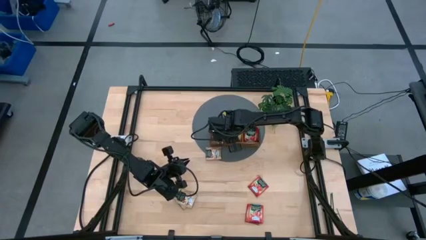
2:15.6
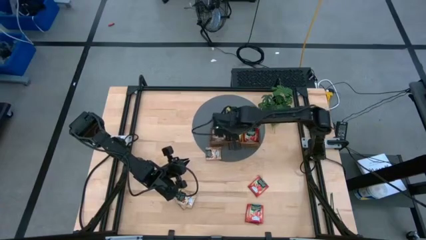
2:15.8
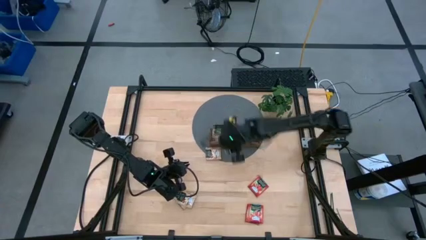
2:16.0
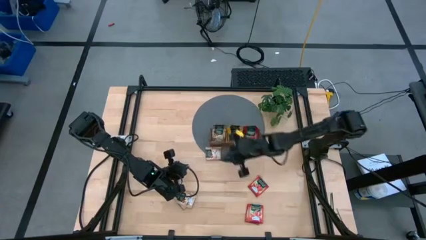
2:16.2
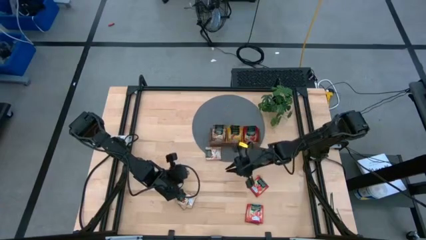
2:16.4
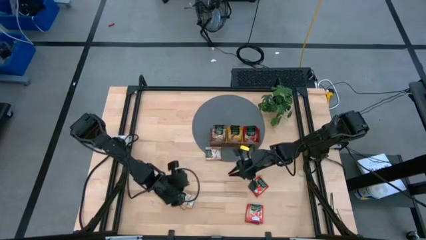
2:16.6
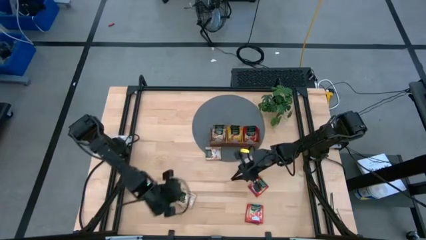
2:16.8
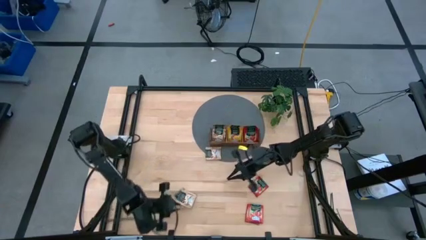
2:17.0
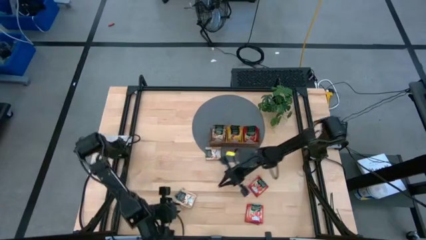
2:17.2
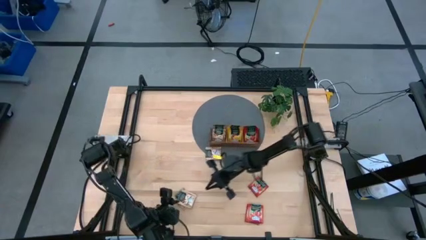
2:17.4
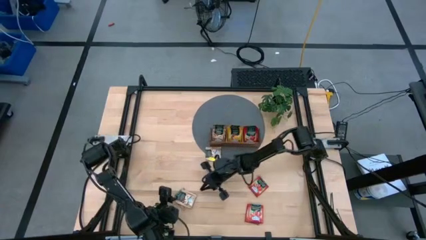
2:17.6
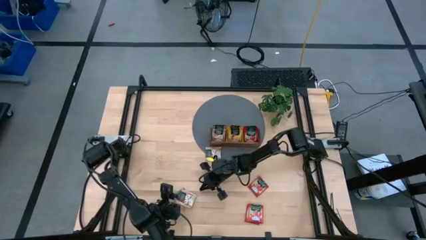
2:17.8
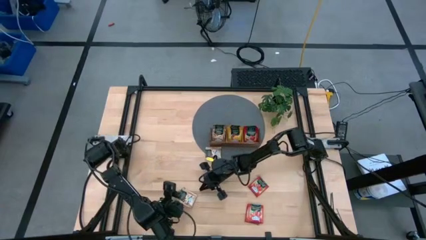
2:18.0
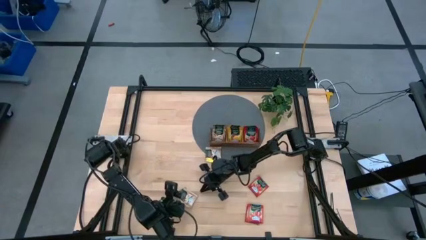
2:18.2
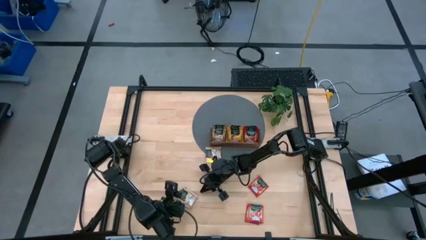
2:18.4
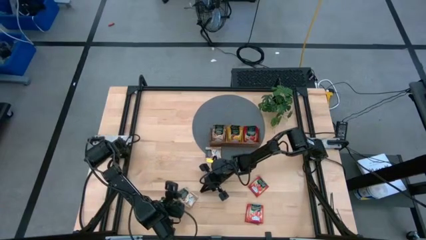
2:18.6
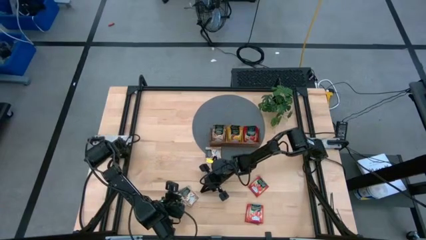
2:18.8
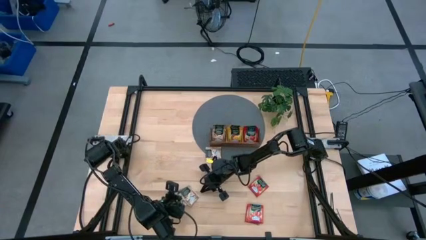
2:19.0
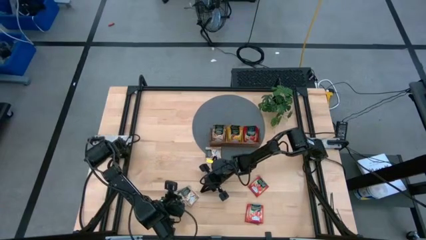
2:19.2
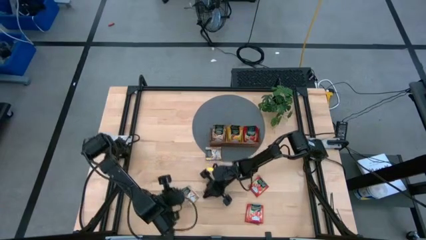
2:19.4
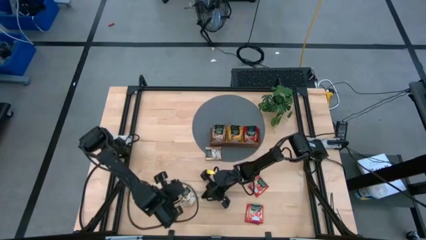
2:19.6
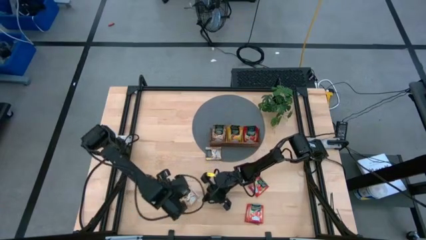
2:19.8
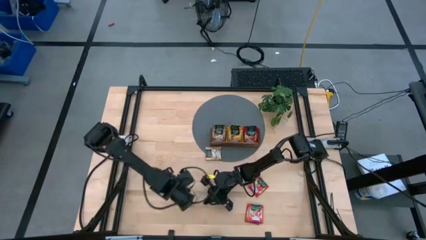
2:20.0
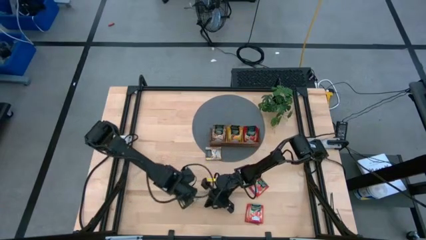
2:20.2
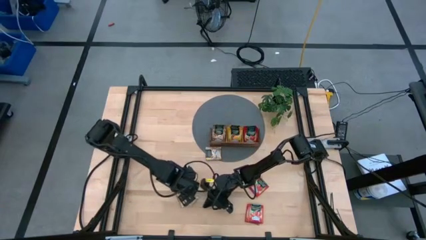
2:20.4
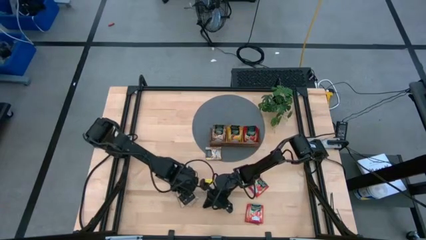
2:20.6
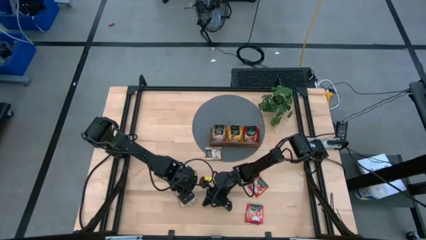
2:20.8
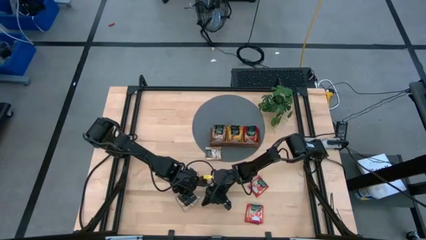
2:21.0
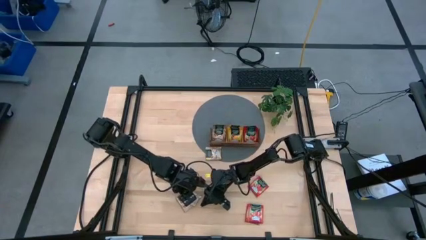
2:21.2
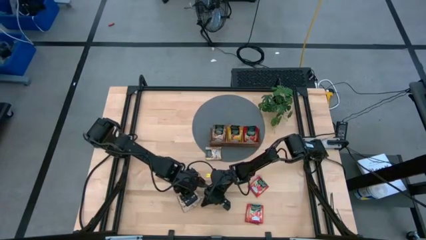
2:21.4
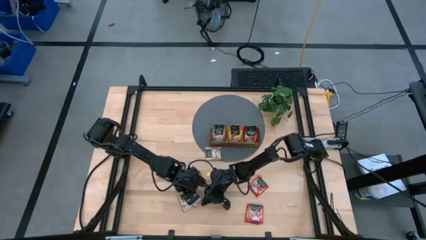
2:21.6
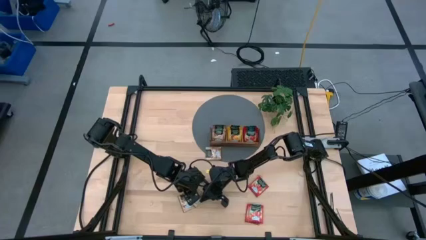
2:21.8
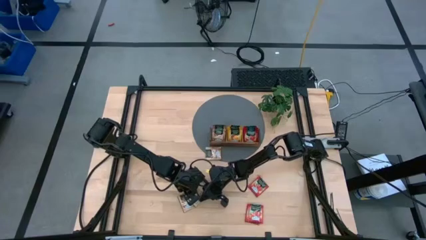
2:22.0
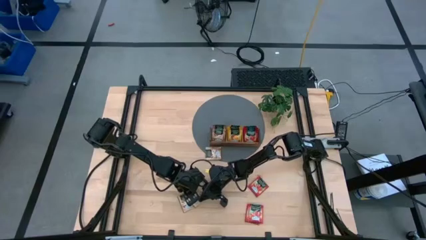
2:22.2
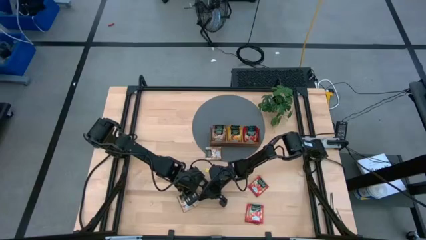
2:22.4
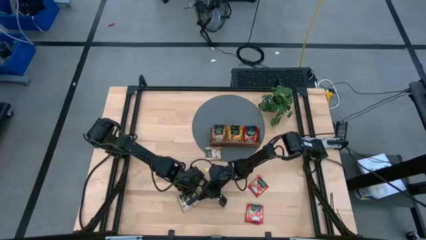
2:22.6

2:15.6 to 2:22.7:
Task: Pick & Place Tea
Put the right brown tea packet into the left section of the wooden organizer

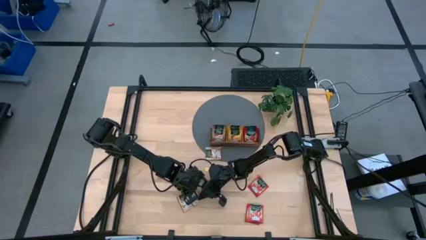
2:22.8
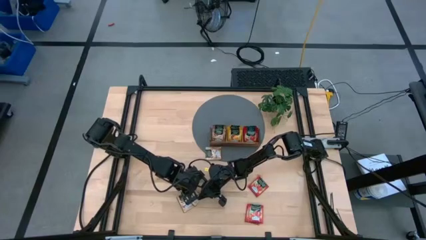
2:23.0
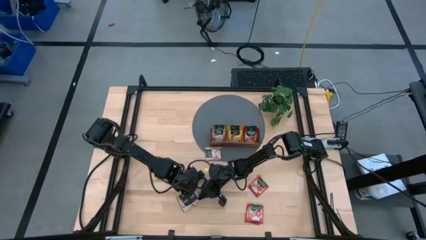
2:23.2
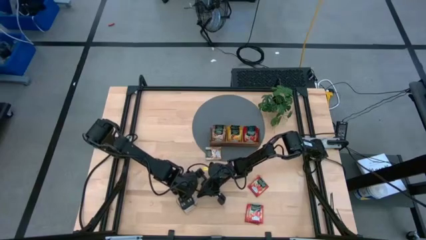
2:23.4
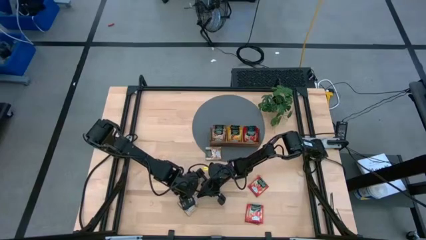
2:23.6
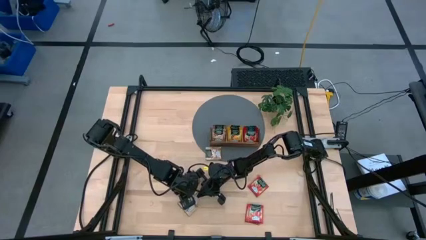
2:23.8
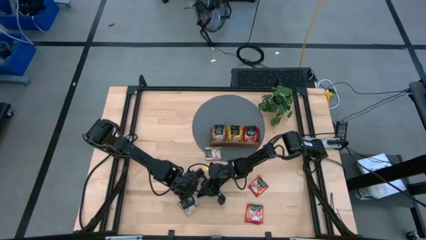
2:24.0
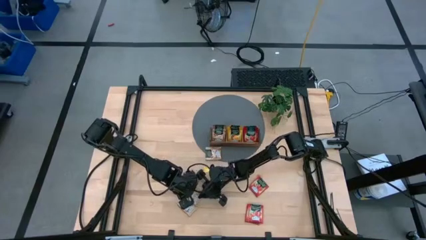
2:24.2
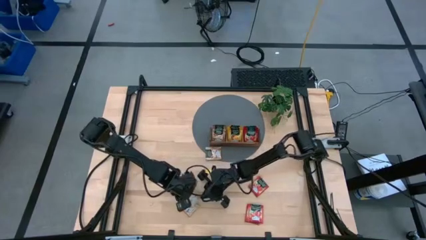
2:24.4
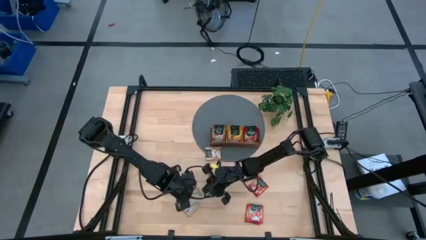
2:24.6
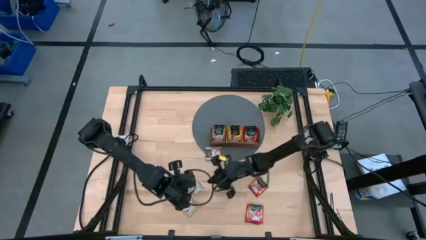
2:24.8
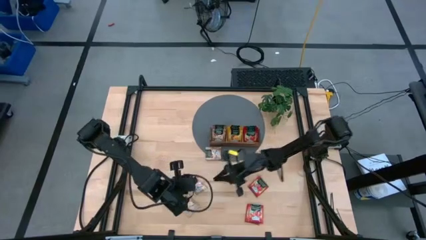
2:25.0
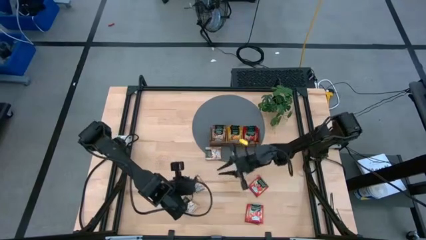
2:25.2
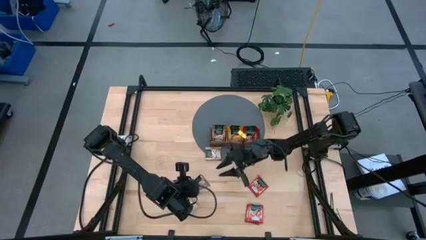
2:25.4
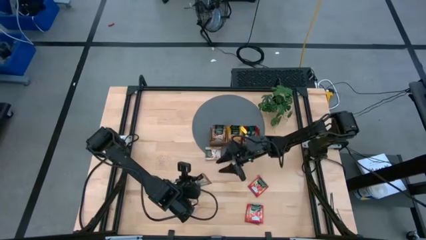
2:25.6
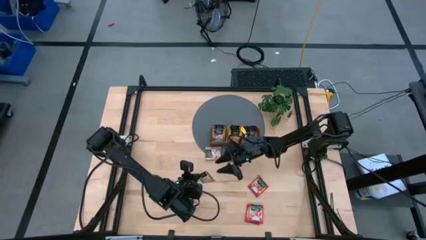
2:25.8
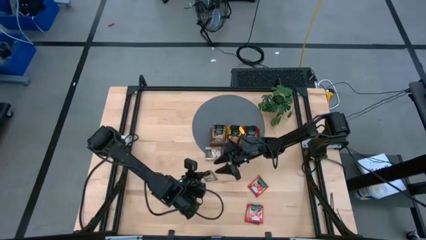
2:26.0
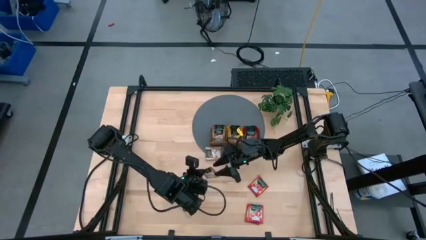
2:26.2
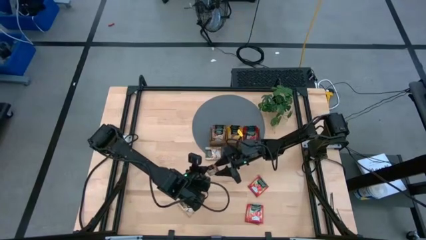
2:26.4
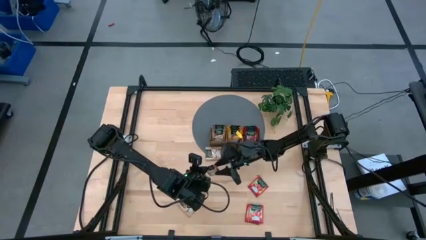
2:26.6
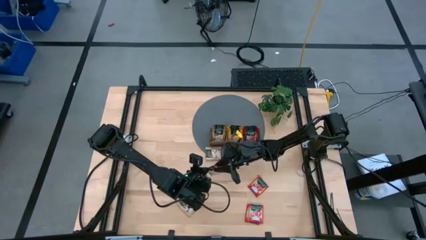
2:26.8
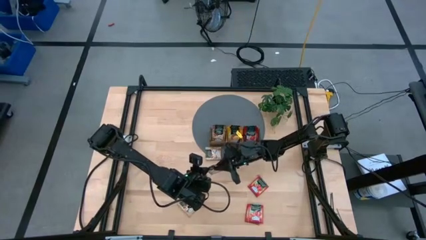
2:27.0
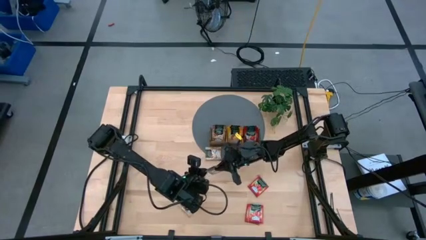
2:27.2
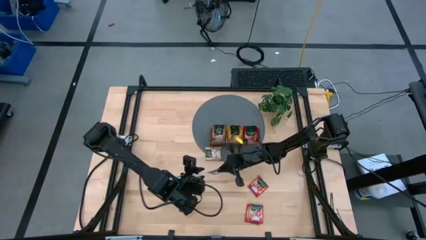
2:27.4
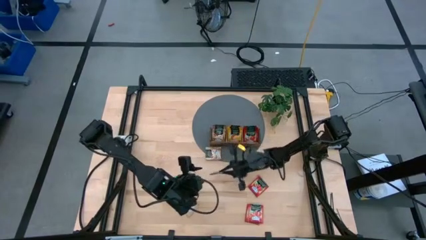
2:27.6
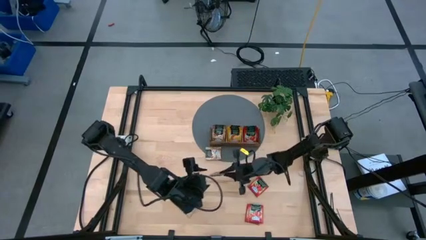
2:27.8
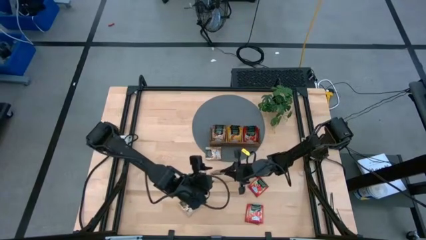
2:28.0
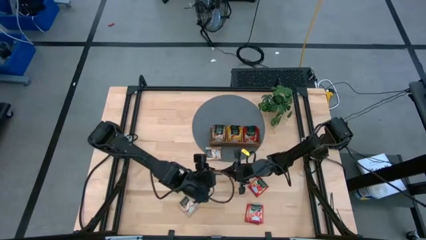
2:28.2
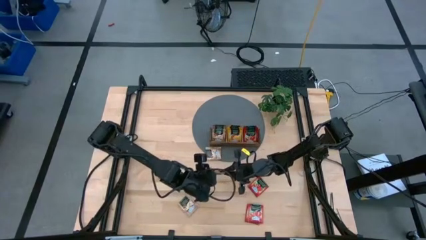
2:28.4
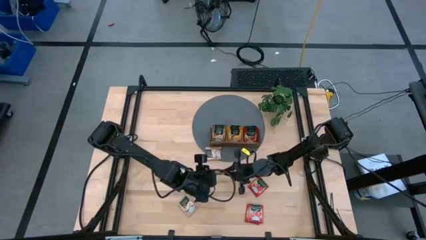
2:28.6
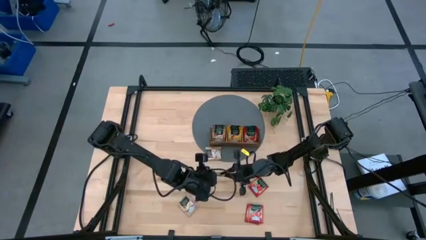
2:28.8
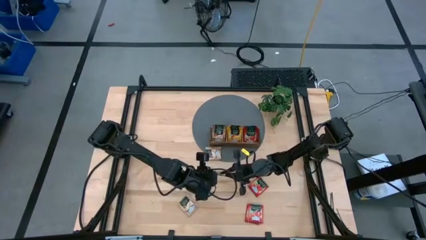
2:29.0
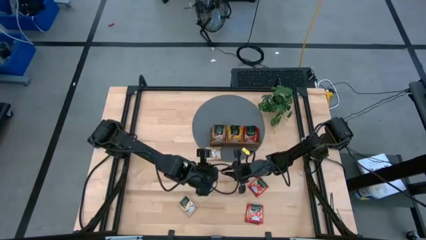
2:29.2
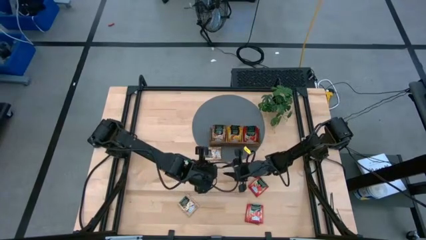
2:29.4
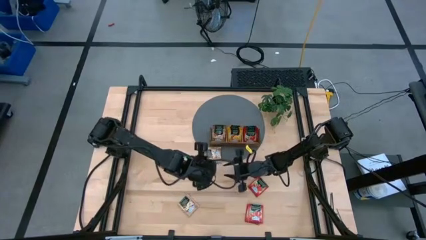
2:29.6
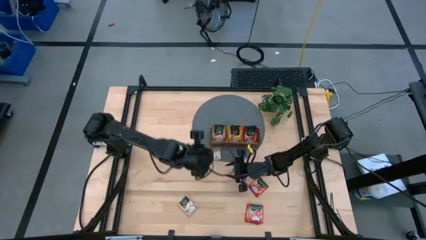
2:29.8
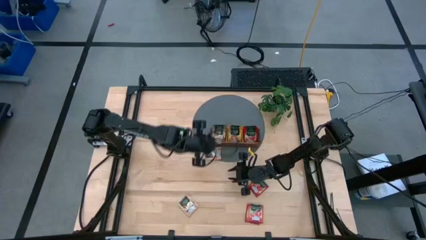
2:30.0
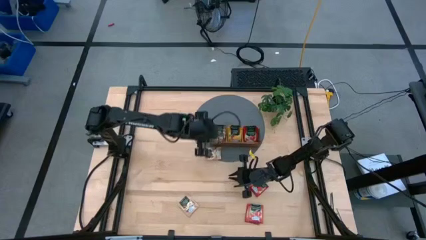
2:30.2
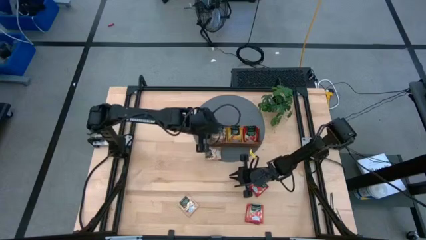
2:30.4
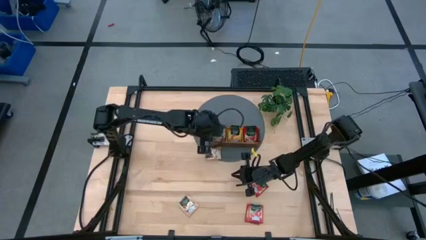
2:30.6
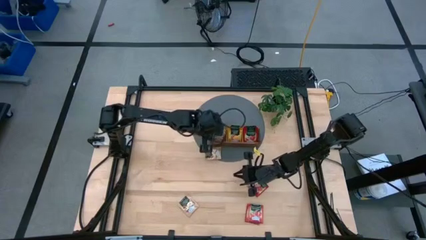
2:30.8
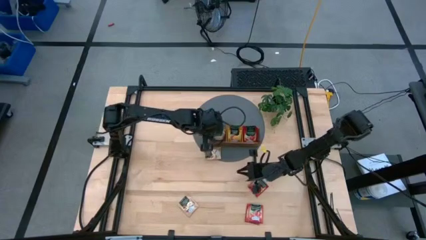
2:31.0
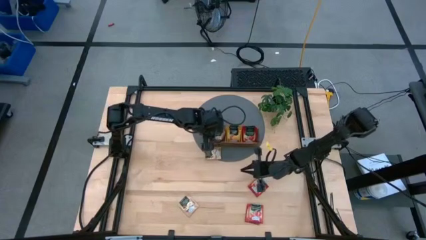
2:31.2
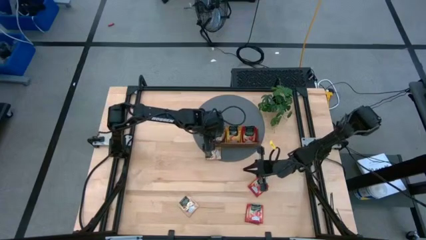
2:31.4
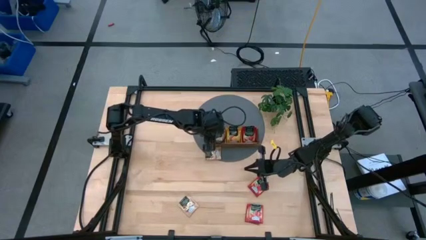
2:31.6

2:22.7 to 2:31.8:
Put the bottom right brown tea packet into the left section of the wooden organizer

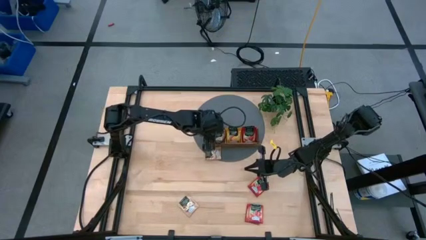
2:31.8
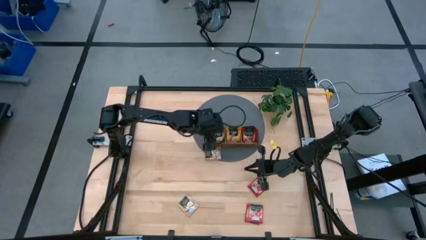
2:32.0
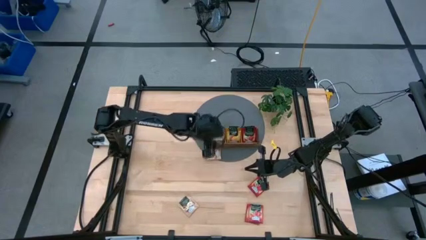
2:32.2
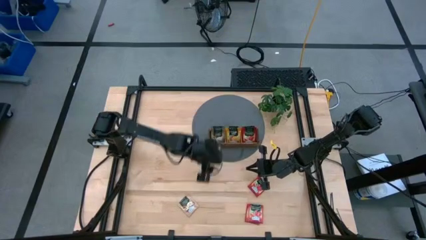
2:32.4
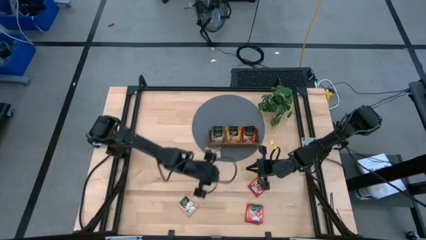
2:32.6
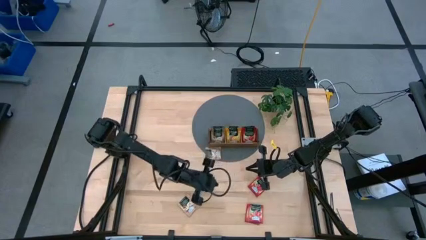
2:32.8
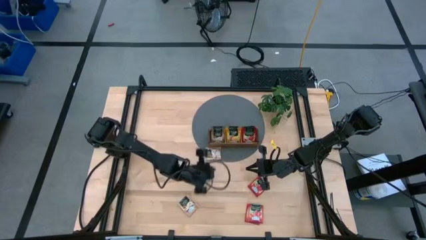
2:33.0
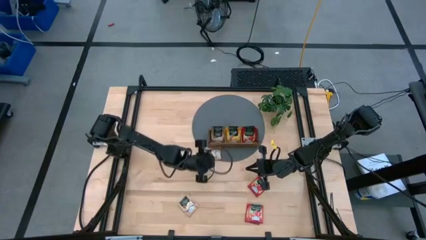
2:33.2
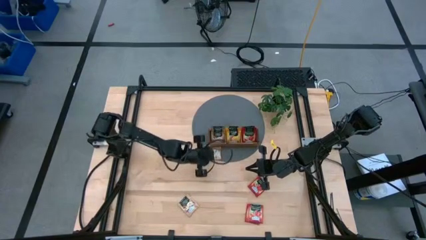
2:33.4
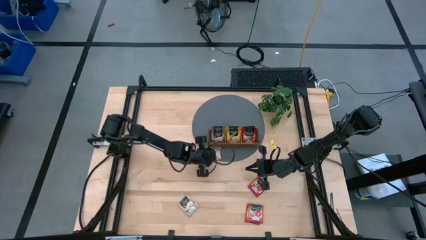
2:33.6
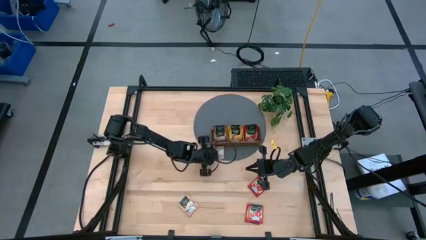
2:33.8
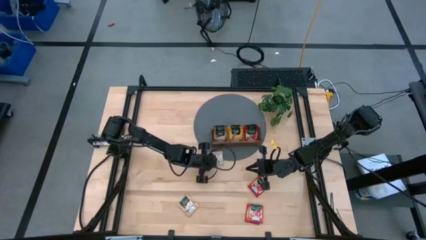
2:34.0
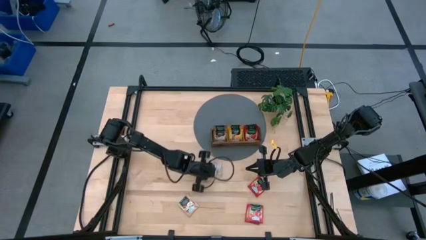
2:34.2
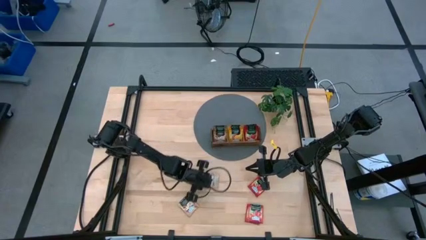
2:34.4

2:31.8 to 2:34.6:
Move the top brown tea packet on the bottom of the table
